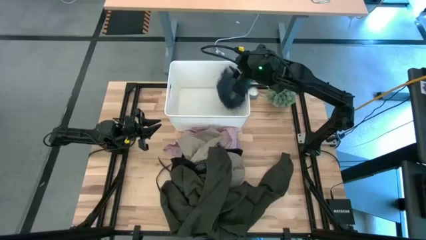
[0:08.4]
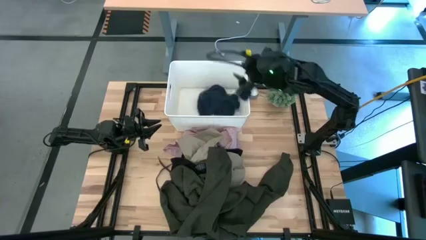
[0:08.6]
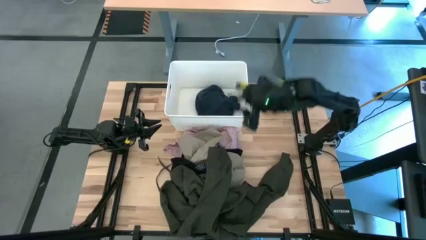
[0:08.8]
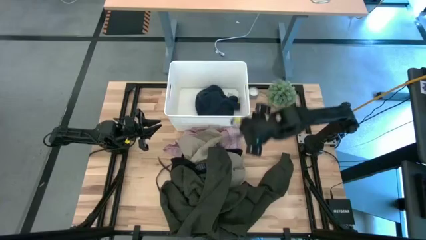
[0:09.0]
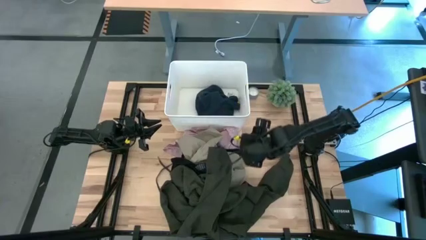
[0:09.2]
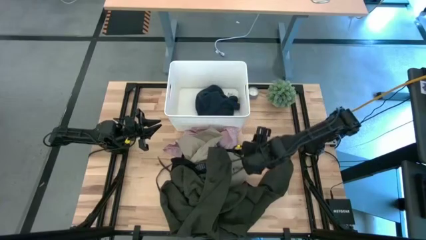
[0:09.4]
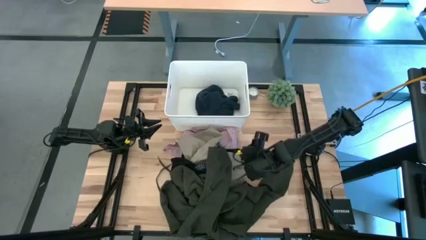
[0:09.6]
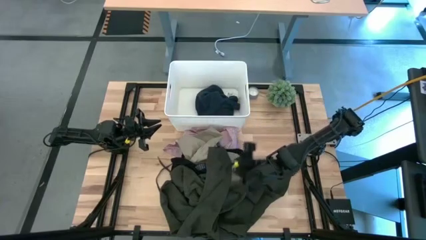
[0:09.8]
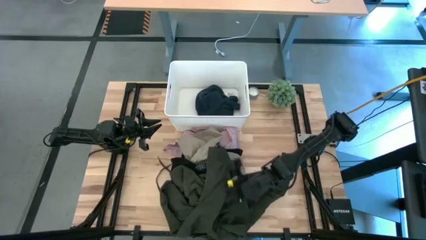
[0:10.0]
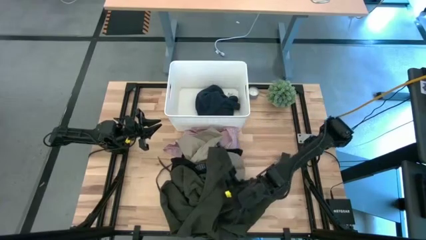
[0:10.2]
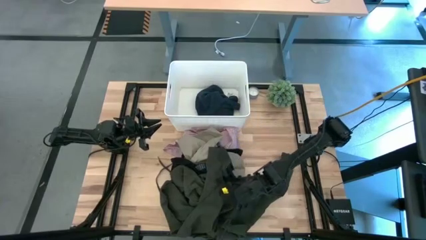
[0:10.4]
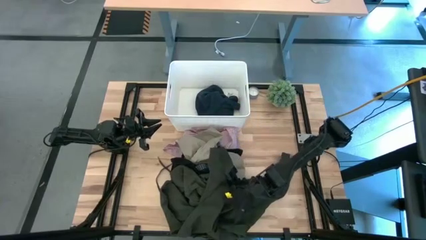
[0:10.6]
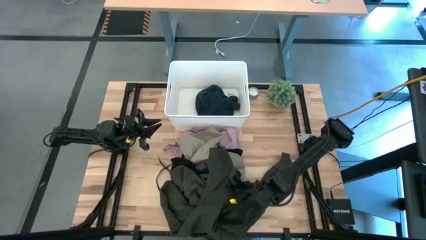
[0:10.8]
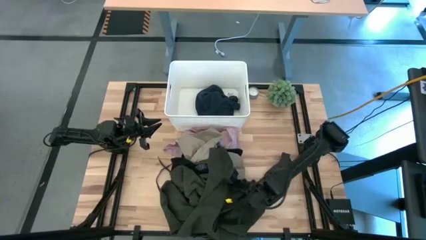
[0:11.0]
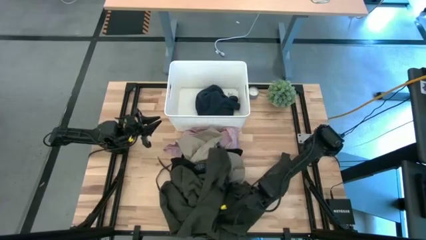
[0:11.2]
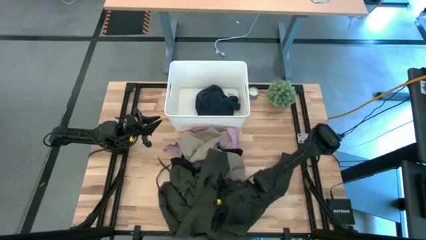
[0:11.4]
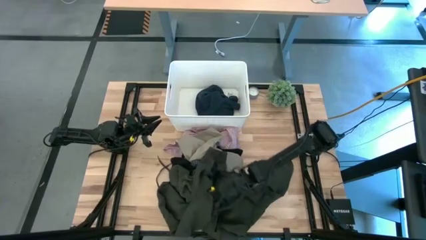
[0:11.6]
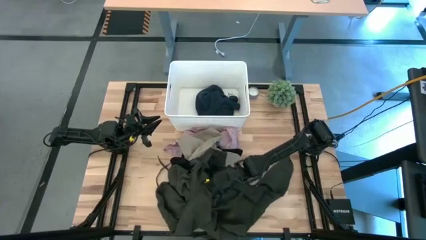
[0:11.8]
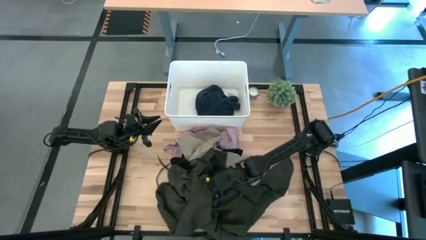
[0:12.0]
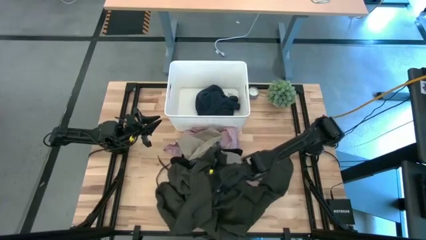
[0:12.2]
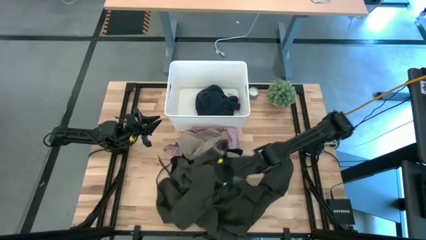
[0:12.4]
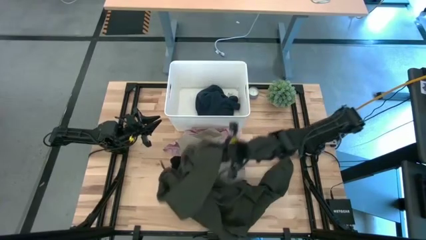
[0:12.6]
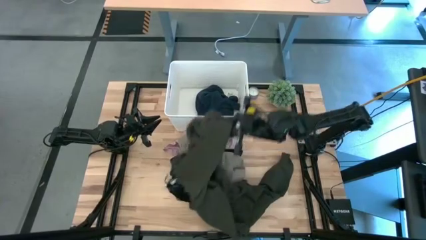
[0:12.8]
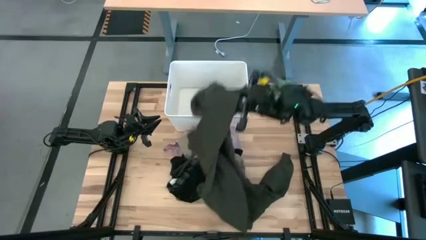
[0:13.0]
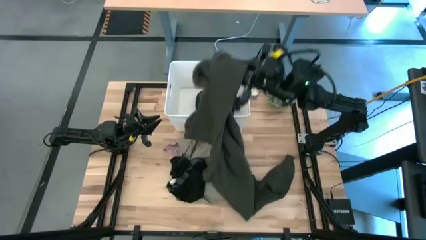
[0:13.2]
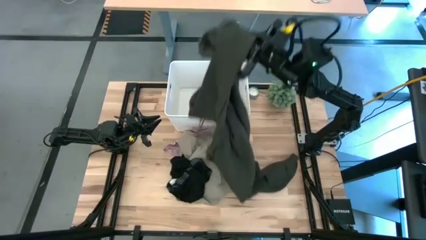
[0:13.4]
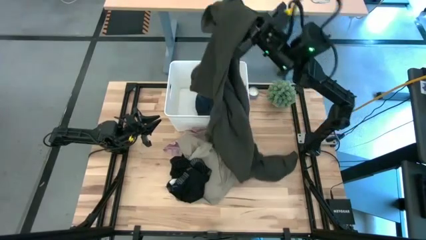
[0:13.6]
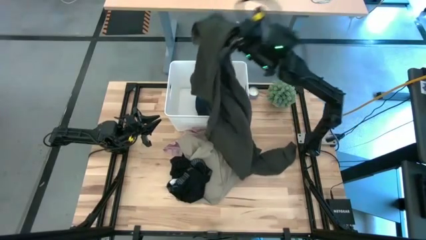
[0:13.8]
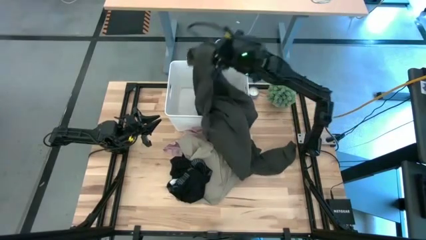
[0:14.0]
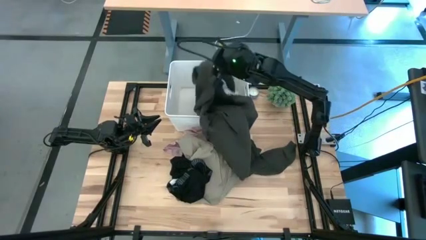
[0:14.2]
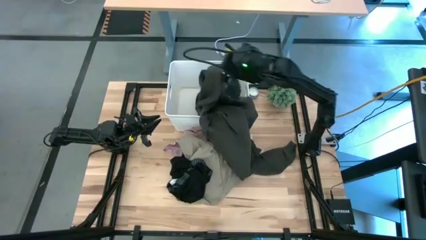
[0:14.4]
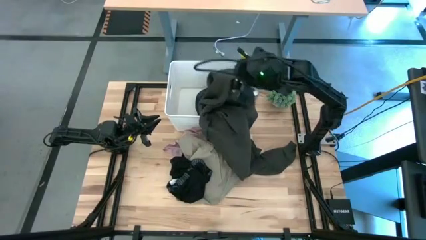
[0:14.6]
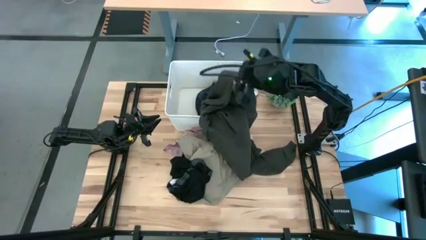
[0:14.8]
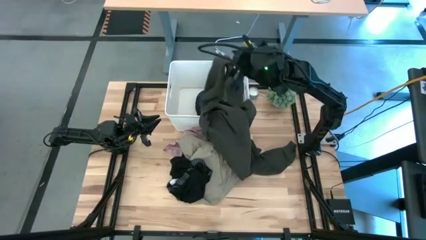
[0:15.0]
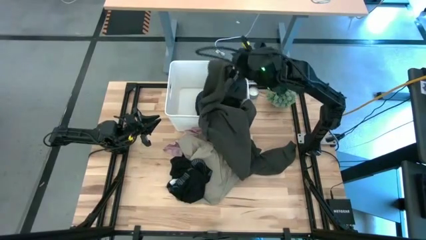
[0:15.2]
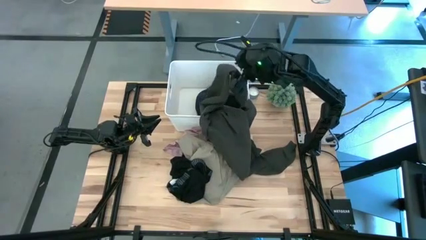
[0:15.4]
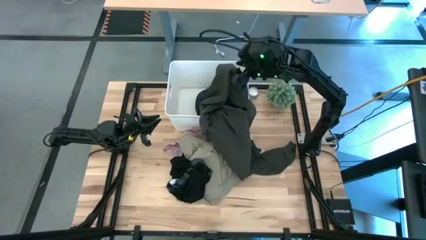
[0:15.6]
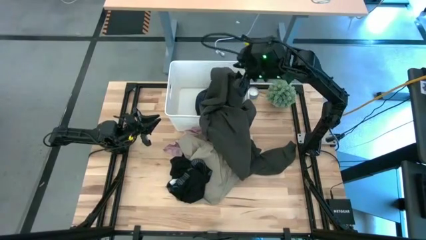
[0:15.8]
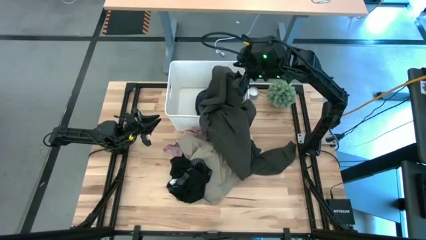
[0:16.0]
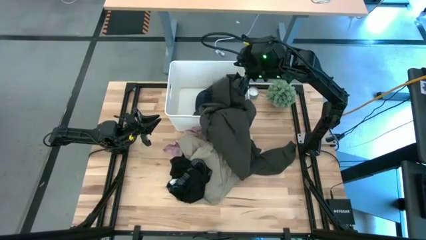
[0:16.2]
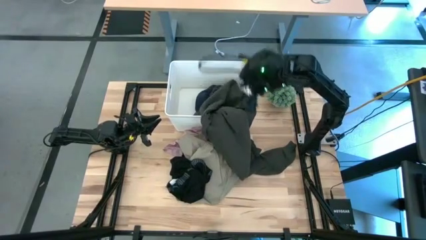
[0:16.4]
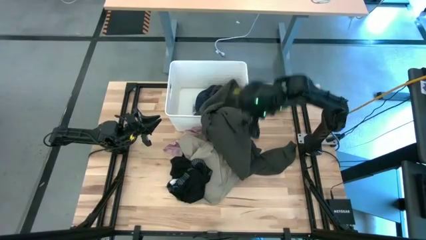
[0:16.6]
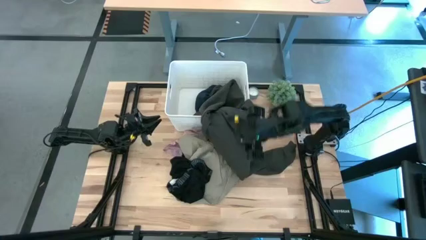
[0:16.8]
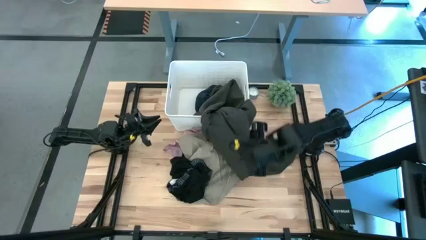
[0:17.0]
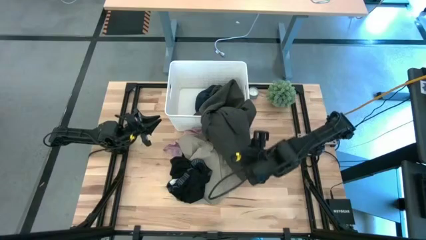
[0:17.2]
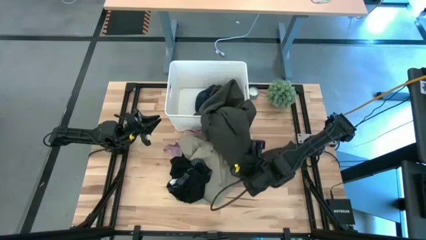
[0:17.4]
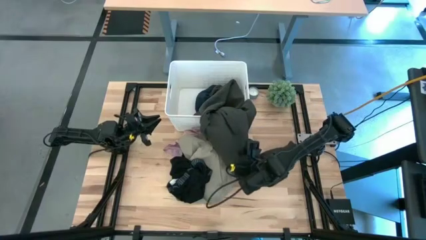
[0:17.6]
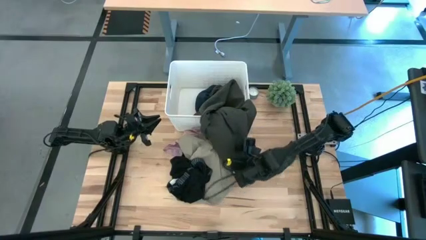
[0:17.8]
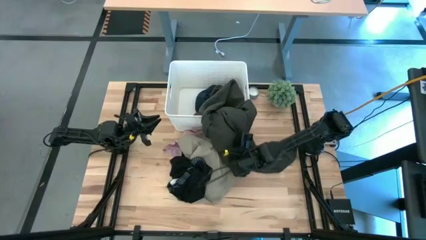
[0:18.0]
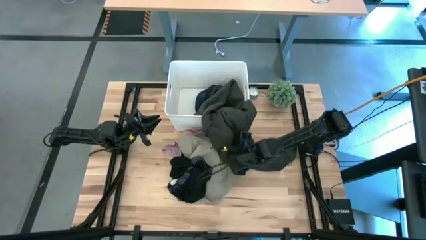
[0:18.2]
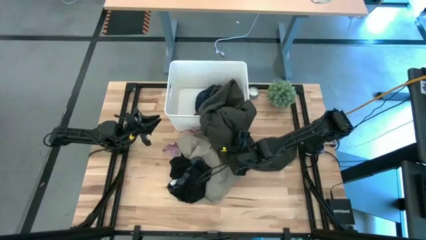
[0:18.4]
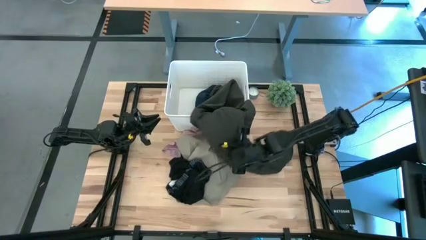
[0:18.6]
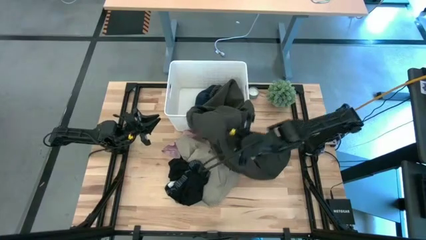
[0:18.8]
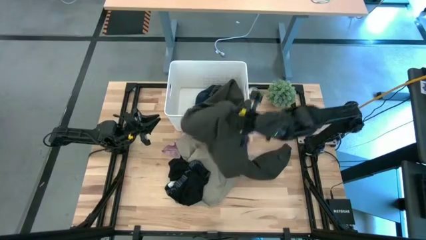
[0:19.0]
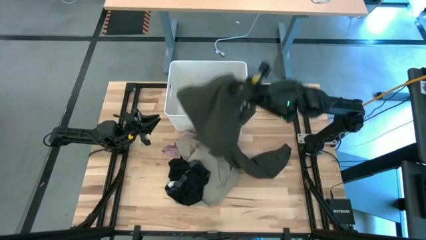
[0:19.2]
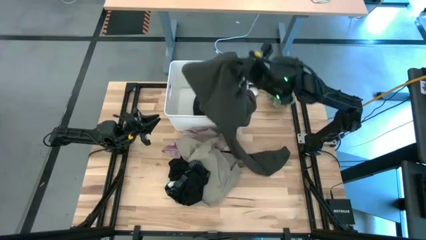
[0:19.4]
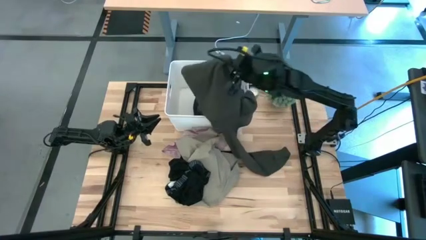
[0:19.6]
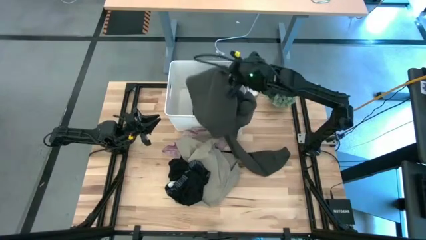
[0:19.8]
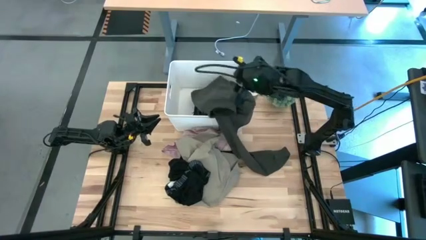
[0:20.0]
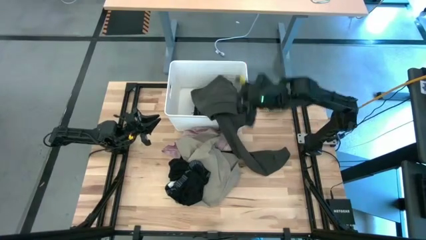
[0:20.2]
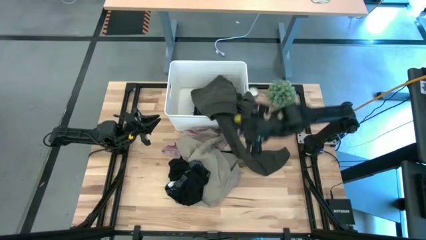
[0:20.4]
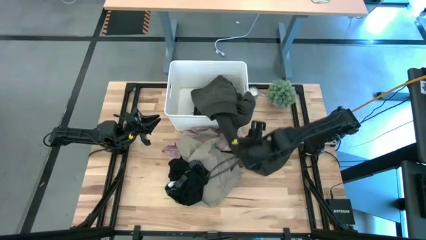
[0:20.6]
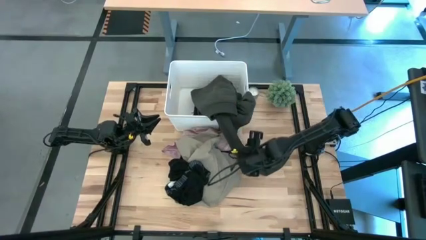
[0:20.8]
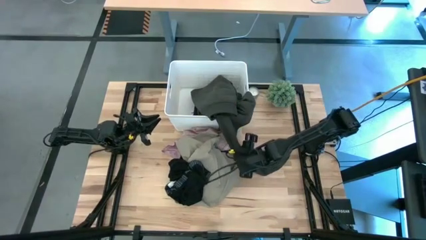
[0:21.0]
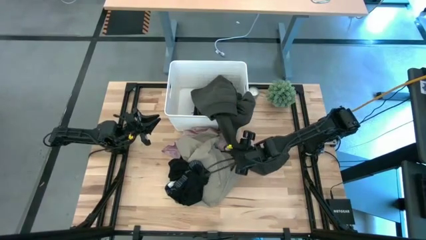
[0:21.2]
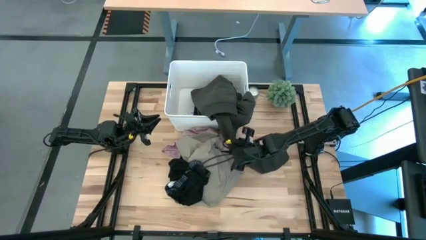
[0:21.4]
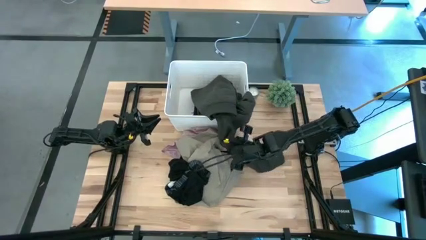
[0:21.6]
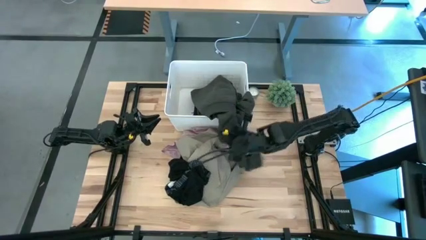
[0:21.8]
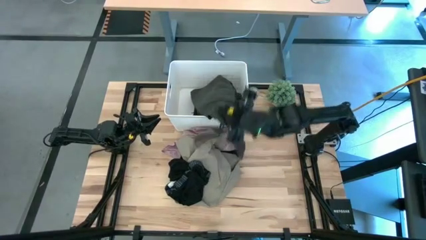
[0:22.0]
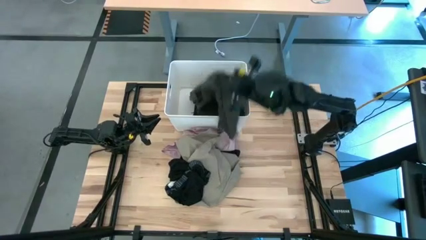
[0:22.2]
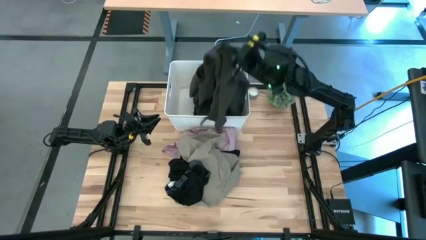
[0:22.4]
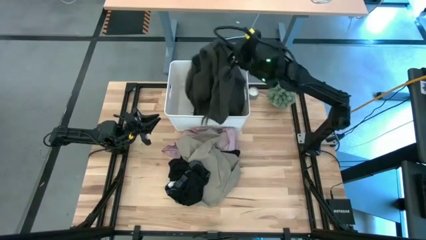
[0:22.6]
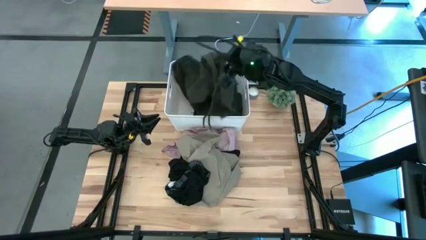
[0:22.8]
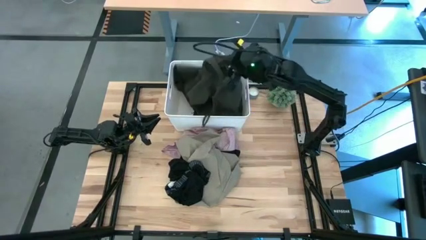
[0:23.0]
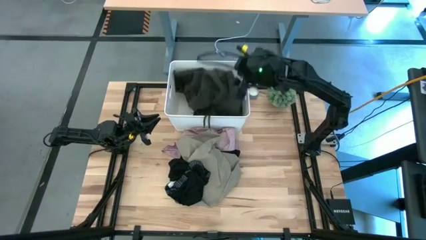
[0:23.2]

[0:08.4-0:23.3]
Task: Sort clothes
Put the green hoodie into the white laundry organizer

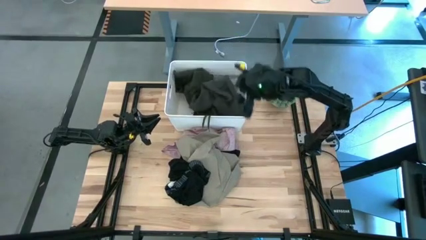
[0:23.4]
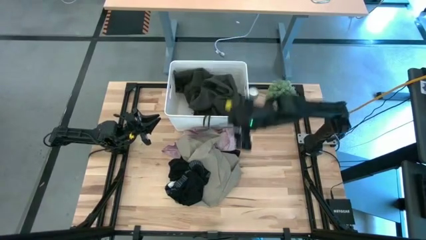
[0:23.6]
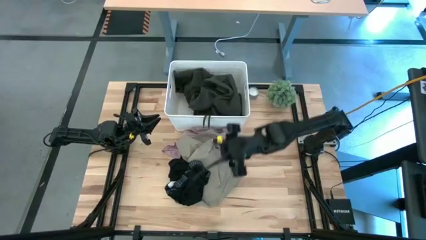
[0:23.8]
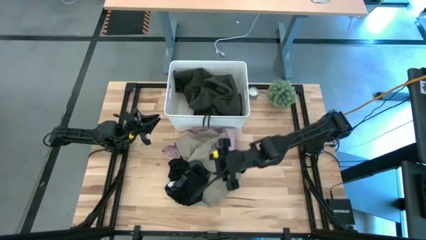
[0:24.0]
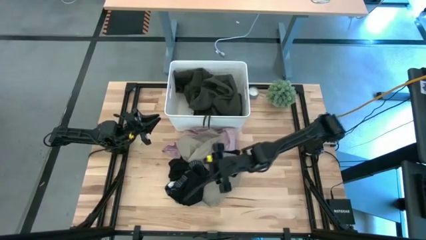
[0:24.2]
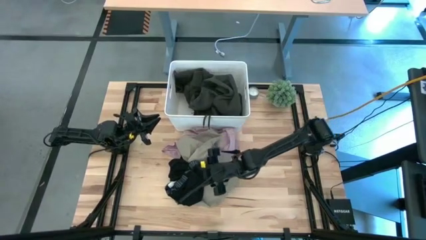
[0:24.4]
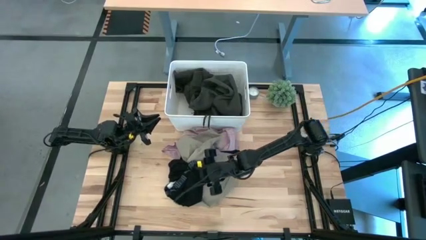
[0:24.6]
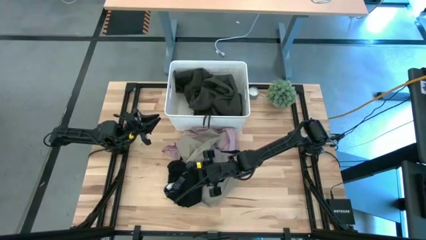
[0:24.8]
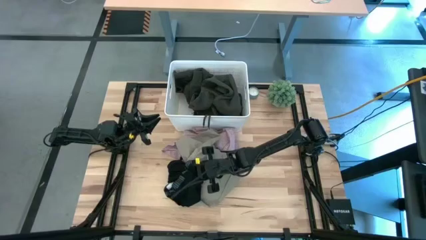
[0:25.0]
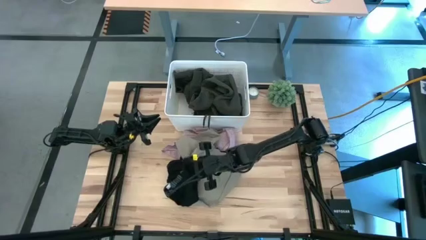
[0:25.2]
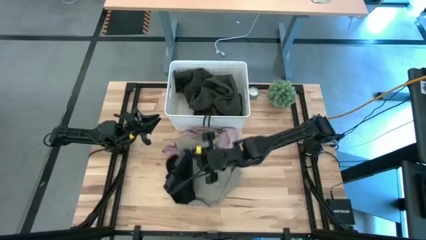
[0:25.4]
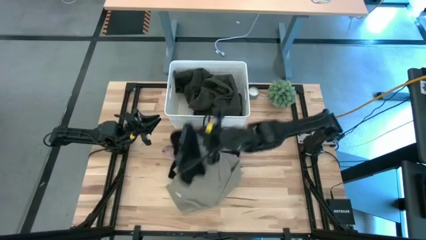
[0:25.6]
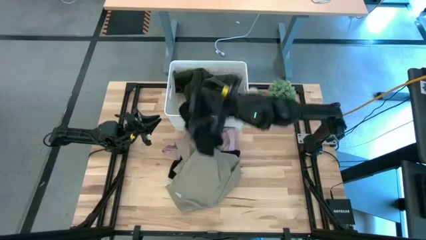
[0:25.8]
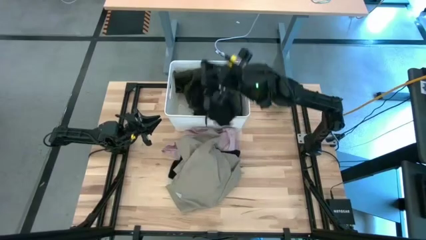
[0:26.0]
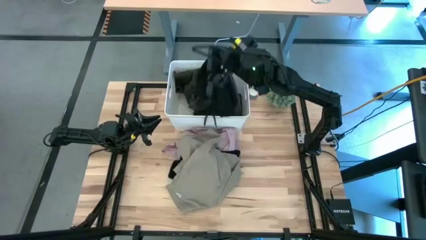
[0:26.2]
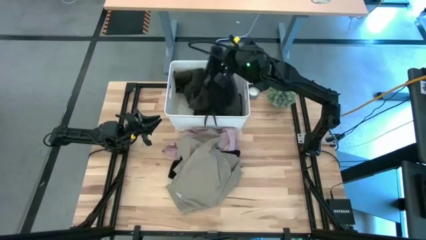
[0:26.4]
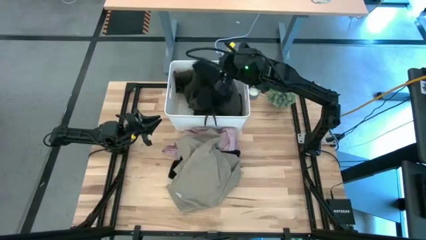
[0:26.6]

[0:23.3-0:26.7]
Put the black underwear into the white laundry organizer
